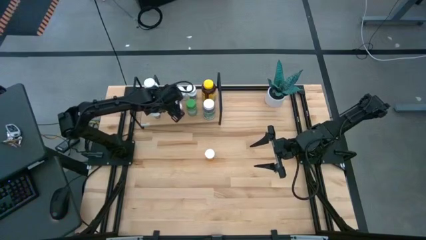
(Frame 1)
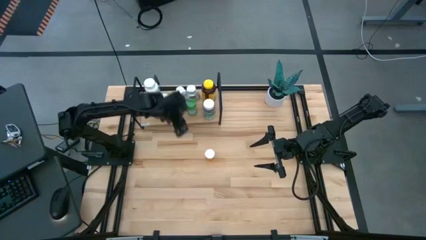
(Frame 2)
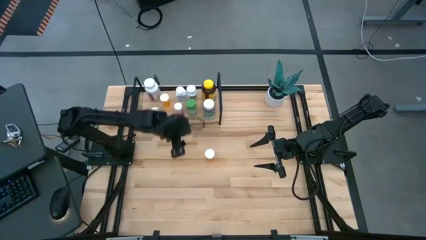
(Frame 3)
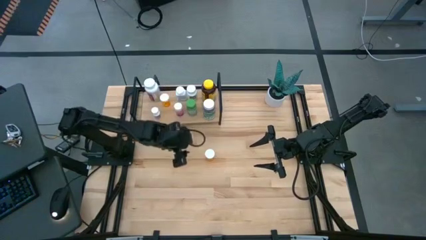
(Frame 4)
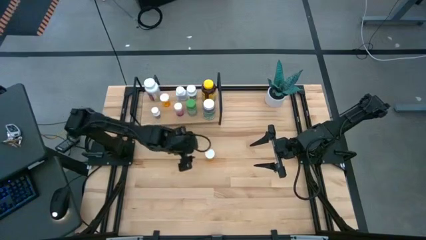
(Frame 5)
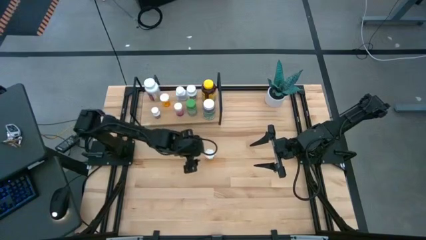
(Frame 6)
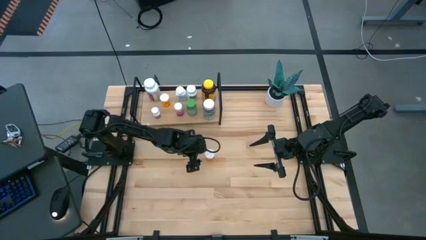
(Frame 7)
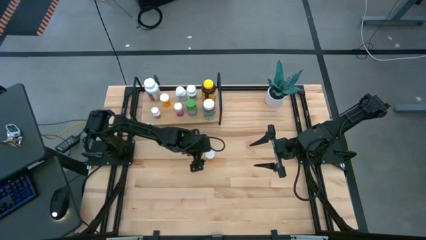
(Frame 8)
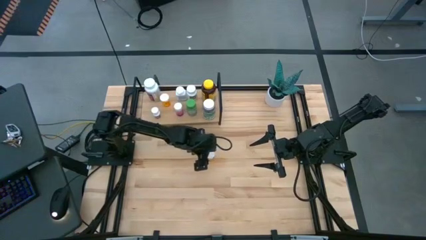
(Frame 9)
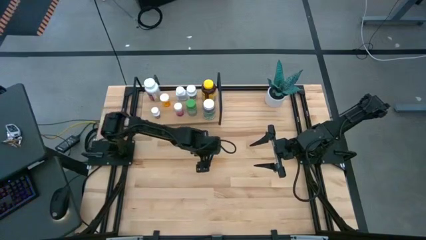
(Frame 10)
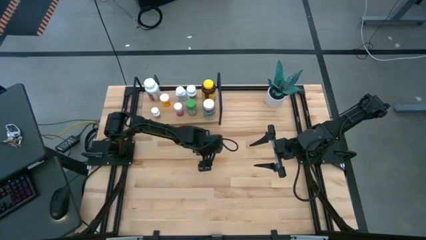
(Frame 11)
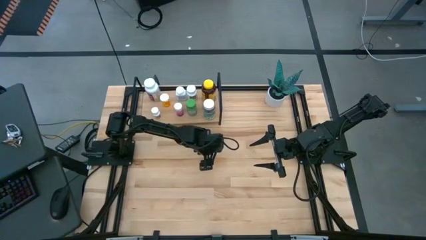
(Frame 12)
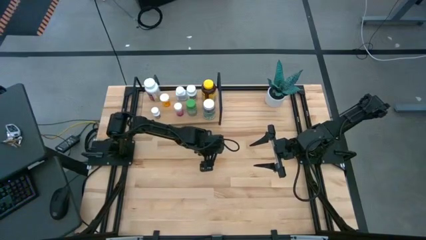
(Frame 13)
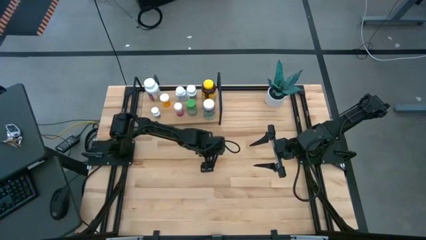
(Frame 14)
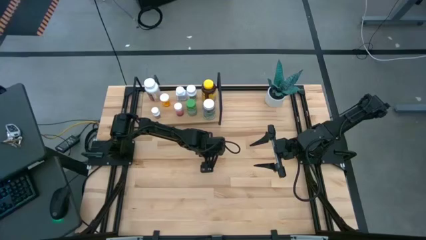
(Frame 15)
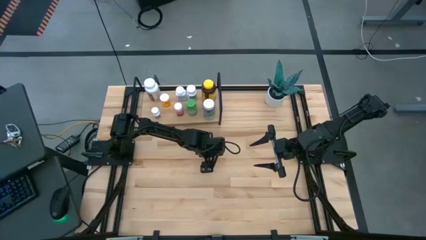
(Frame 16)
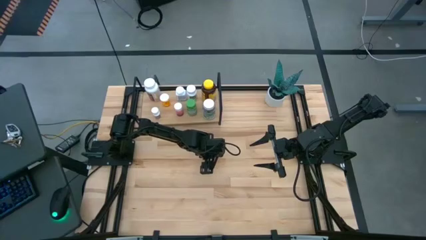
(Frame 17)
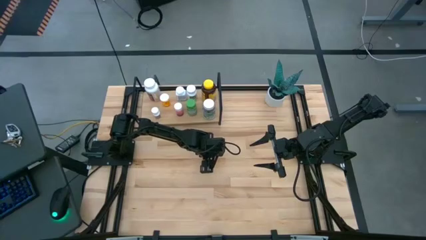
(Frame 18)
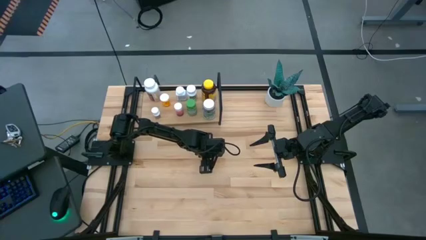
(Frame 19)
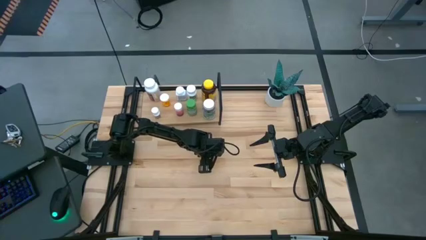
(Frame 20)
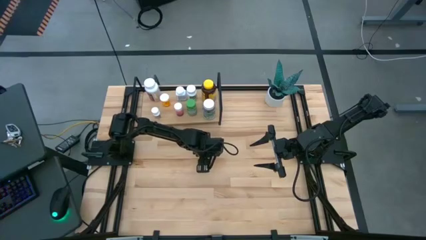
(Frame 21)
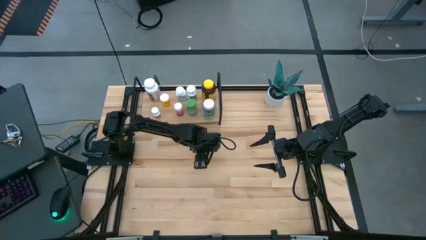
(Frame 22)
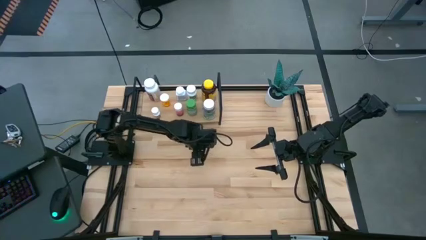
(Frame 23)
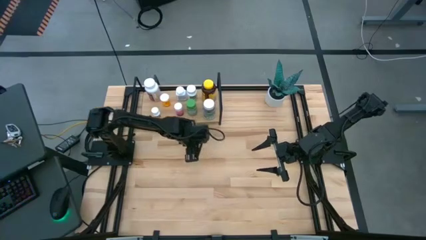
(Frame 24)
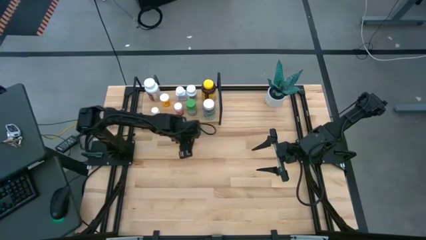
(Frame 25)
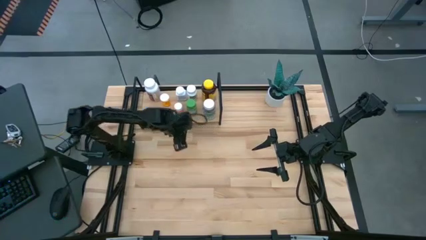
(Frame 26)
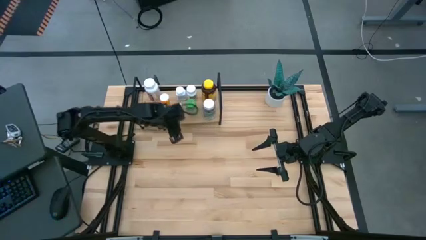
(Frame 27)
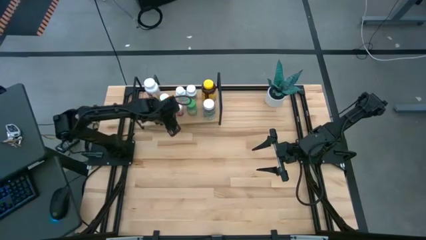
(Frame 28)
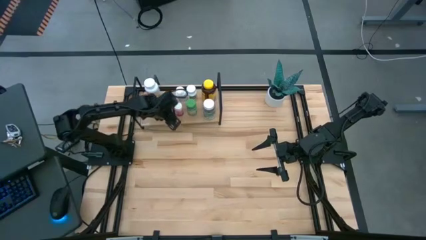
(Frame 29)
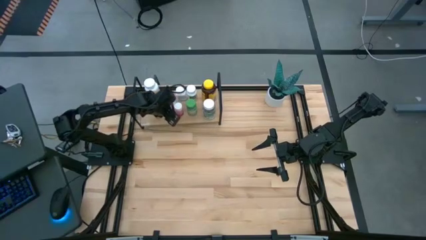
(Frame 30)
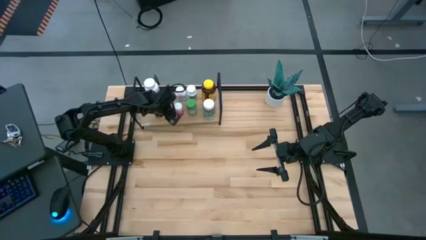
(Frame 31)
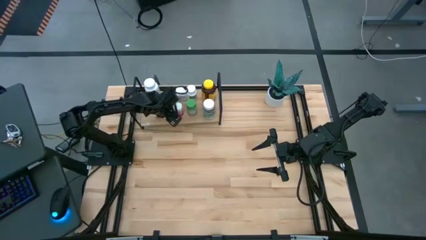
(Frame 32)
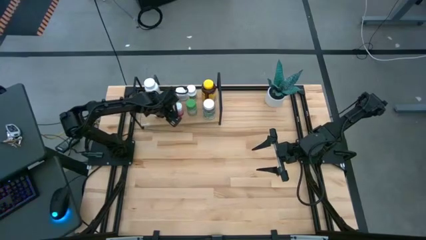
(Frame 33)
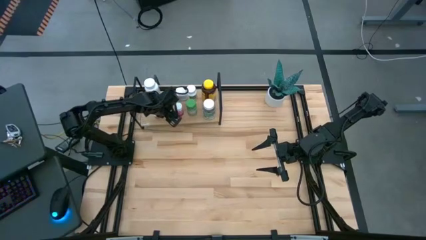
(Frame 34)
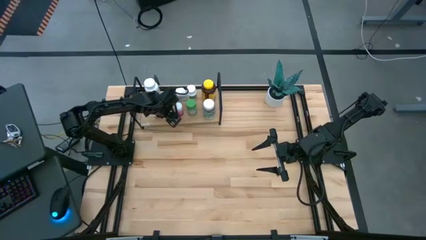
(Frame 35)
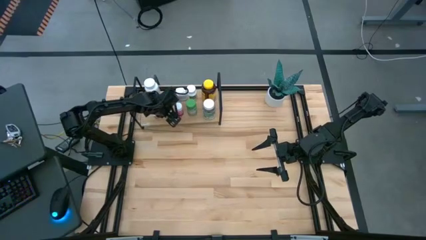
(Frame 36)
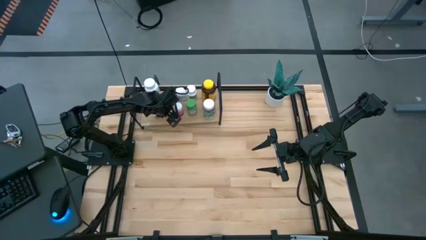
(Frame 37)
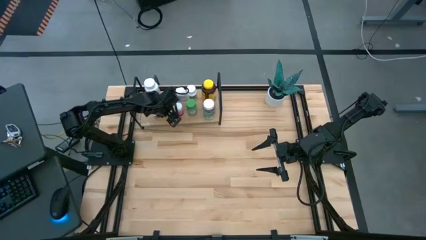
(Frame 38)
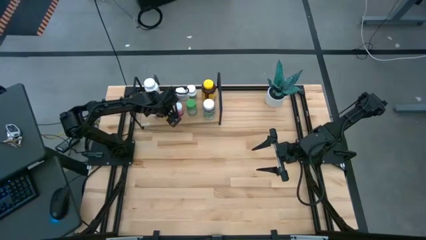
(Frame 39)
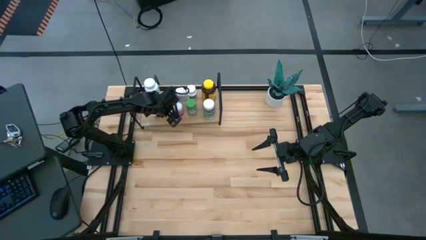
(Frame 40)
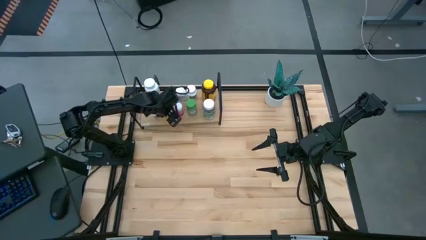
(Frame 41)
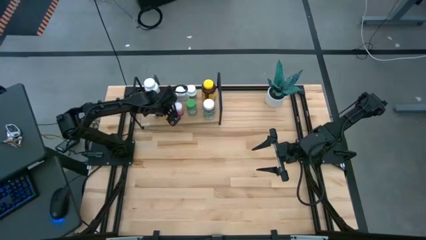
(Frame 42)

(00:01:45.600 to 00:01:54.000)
Task: Pick and place medicine bottles onto shelf by color
Put the orange pill bottle on the shelf

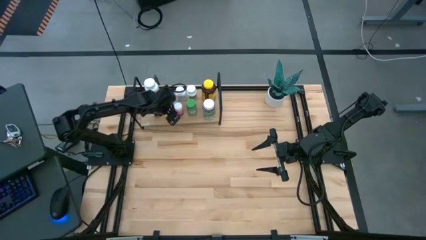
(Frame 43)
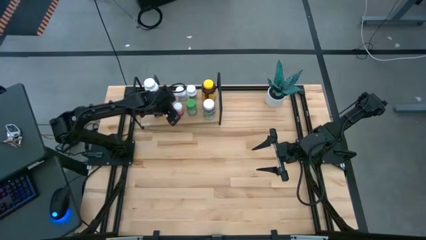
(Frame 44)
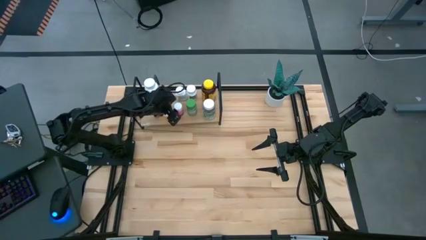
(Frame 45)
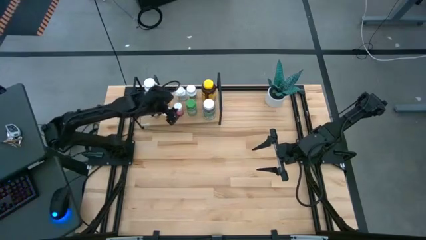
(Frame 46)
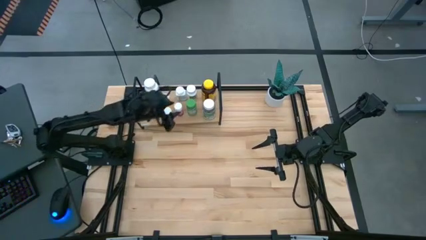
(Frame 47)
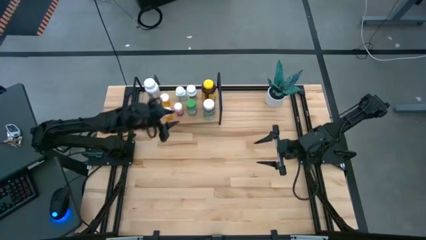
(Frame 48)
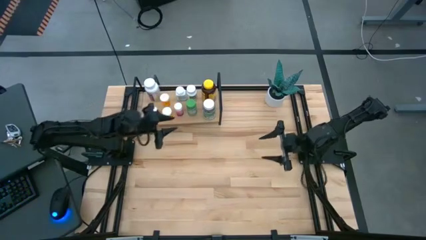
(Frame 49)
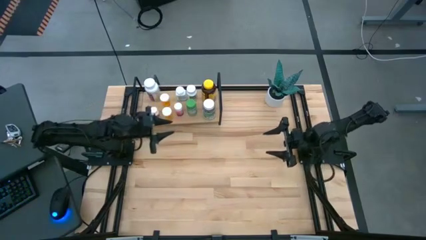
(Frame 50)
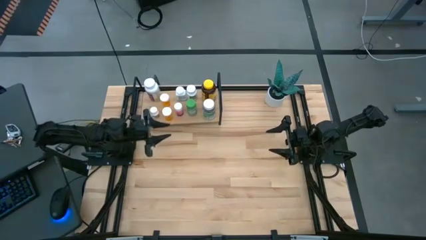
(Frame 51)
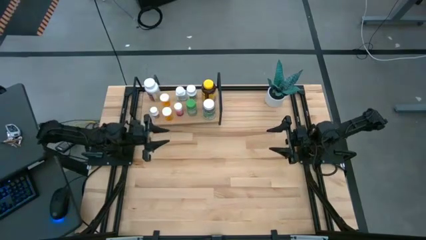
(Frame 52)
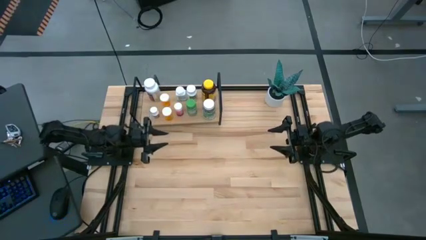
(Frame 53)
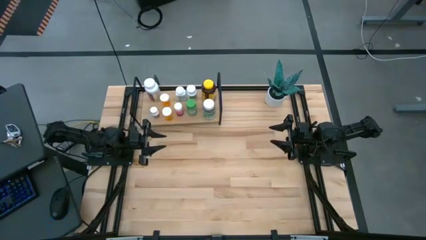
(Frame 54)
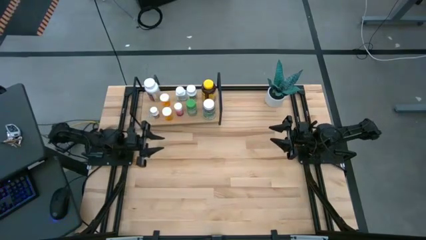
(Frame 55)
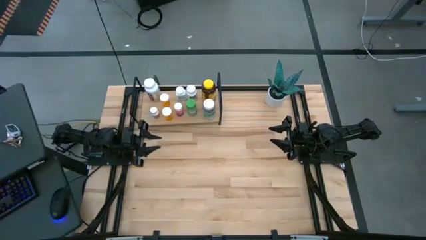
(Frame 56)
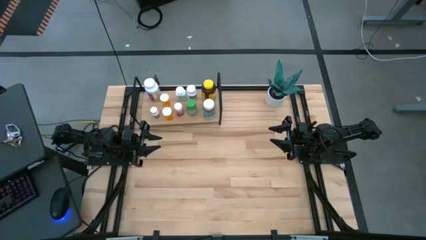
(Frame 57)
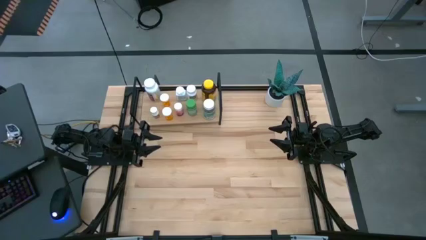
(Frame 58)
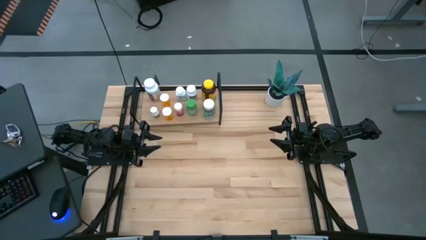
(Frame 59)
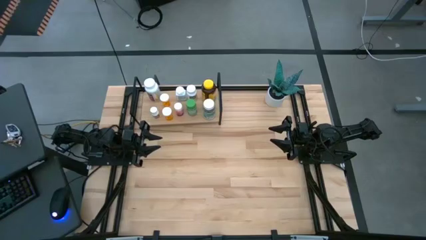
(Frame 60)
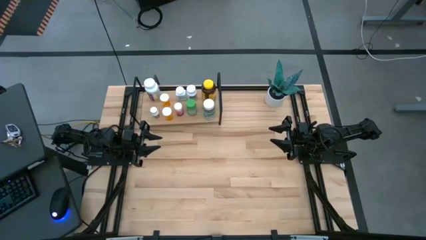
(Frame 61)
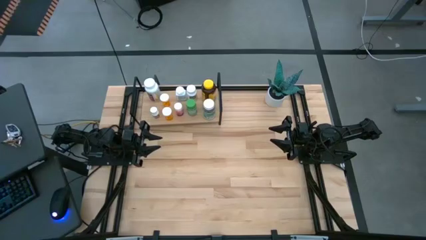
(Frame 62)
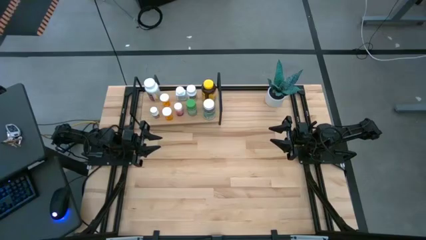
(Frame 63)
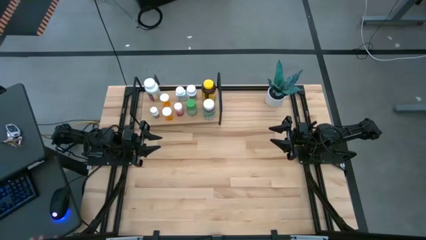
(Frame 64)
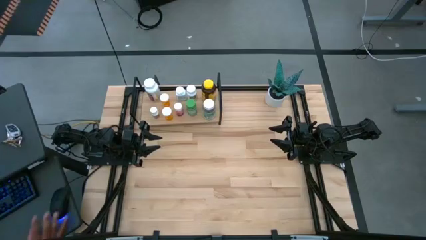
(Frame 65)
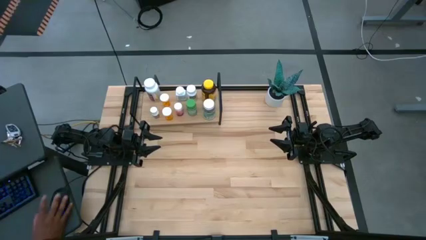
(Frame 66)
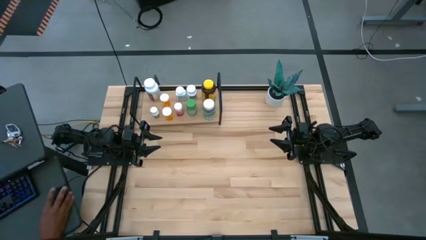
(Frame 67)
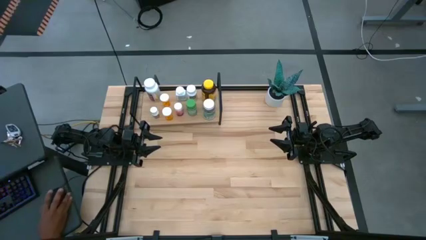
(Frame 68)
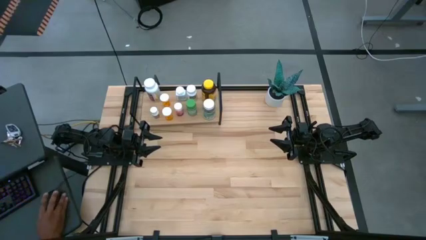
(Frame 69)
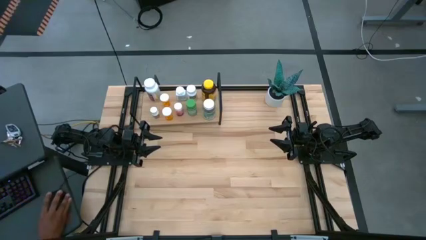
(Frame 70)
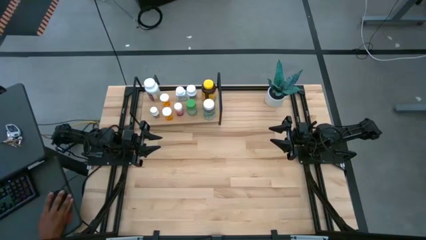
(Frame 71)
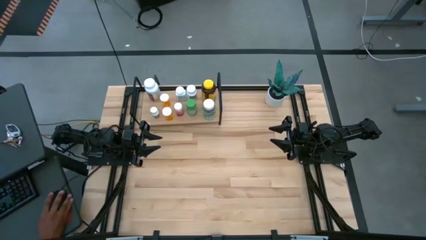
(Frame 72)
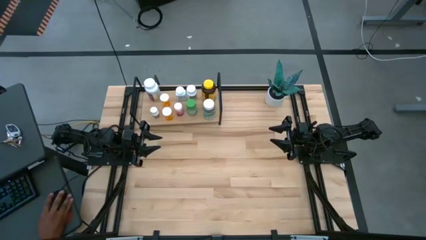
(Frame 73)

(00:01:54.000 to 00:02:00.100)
Return to Home Position

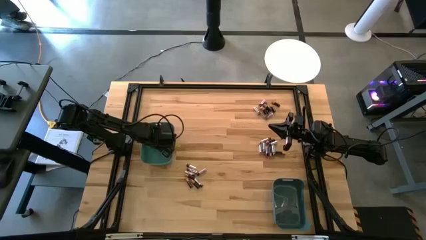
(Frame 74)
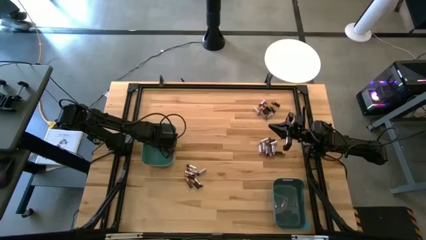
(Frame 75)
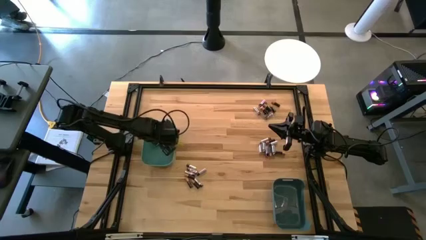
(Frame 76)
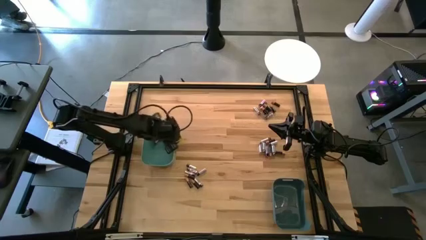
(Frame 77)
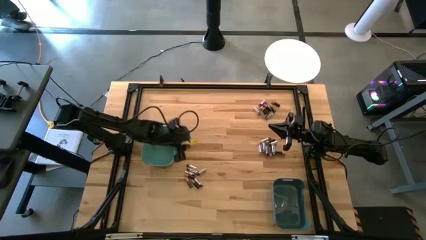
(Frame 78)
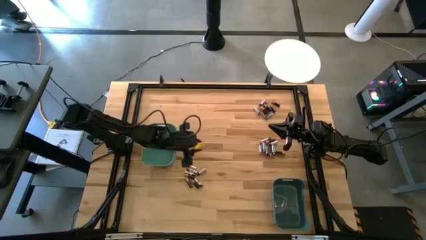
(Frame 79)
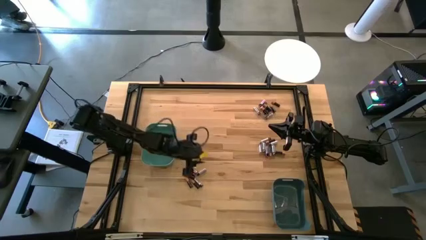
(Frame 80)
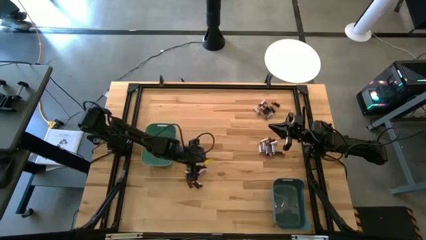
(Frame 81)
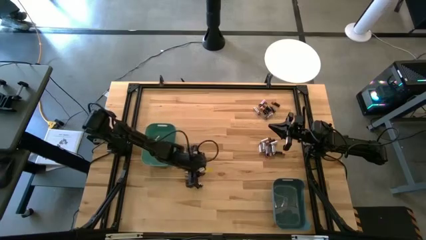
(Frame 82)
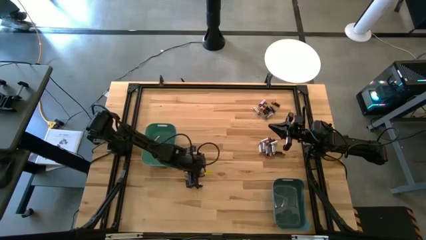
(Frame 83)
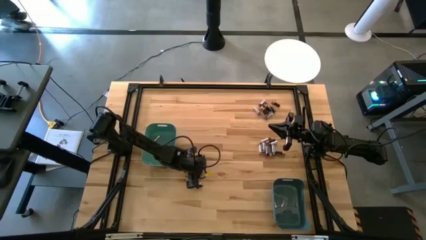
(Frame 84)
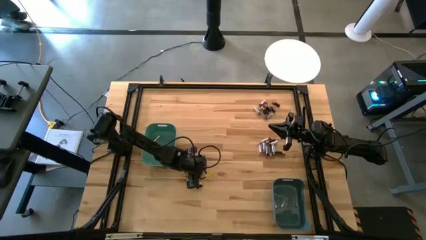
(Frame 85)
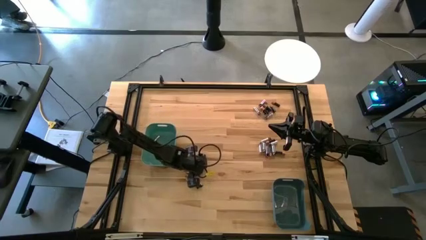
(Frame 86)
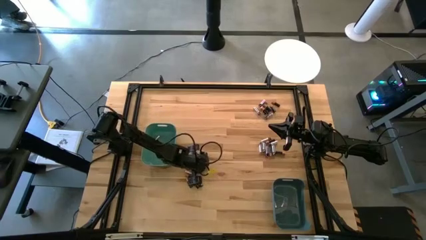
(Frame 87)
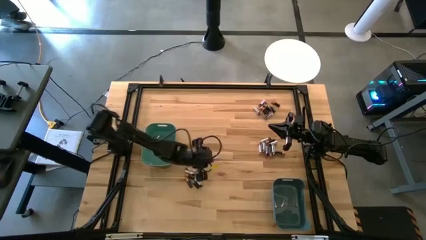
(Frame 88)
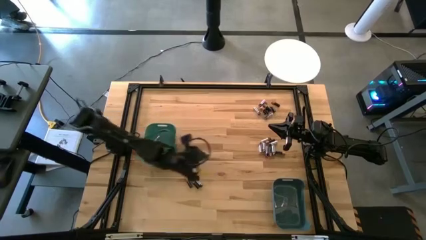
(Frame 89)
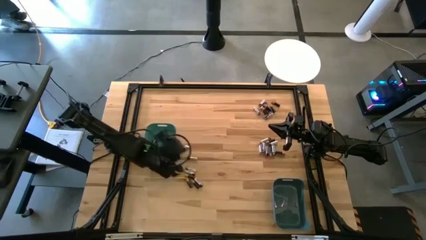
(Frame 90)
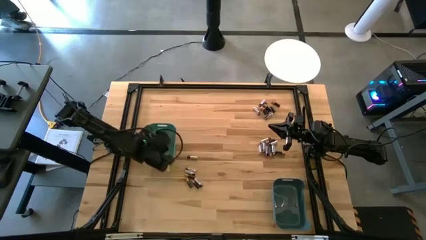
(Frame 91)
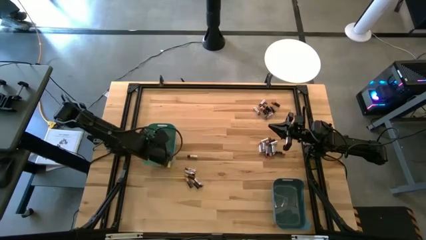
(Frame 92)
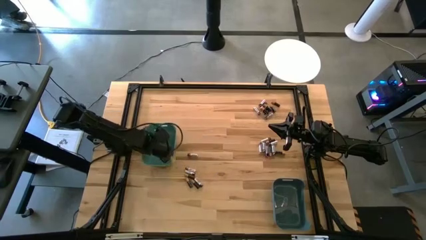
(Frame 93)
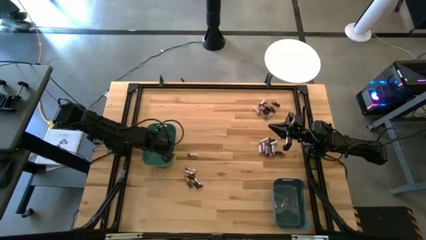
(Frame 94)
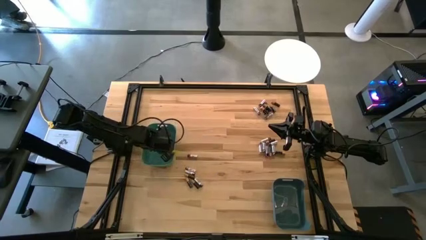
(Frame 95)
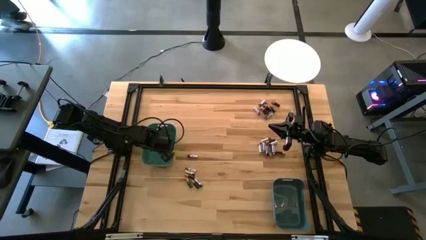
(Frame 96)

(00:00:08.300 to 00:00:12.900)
Task: Sort batteries
Put the silver battery into the green bin
